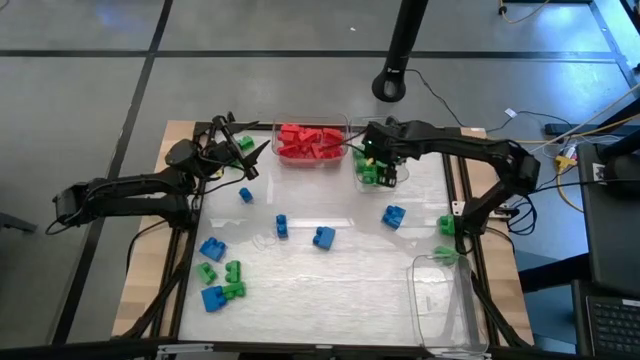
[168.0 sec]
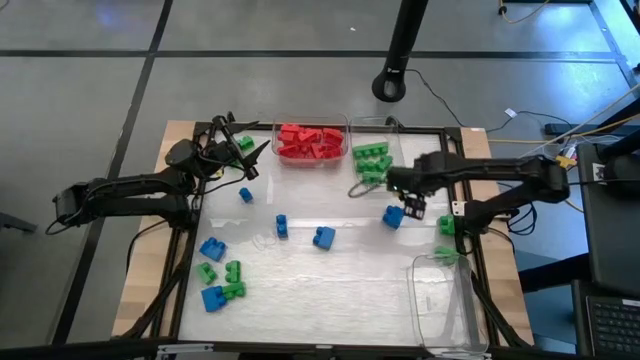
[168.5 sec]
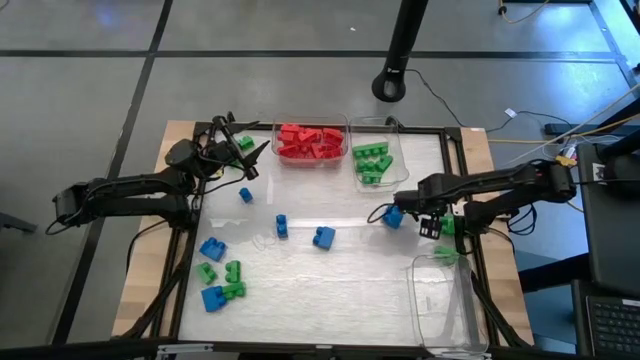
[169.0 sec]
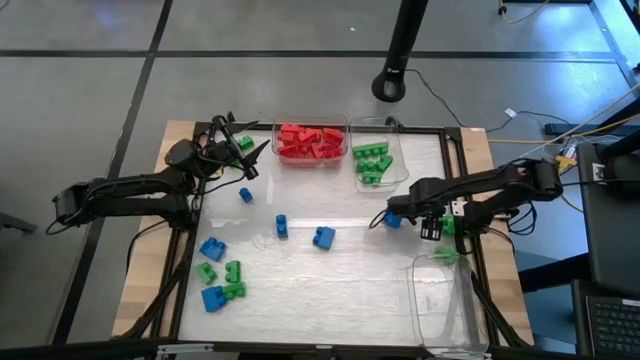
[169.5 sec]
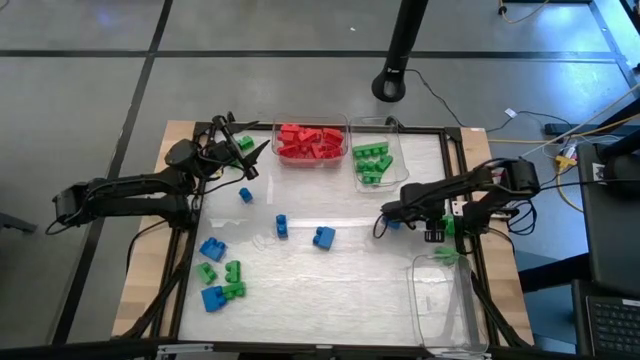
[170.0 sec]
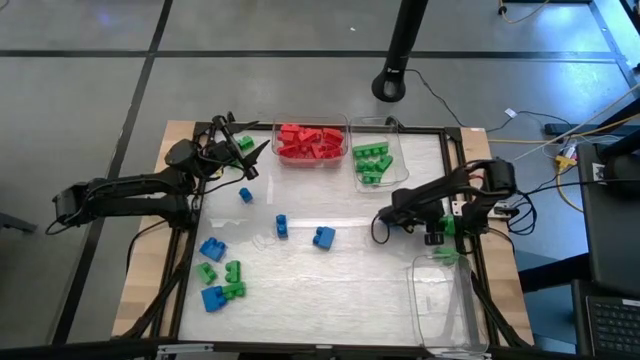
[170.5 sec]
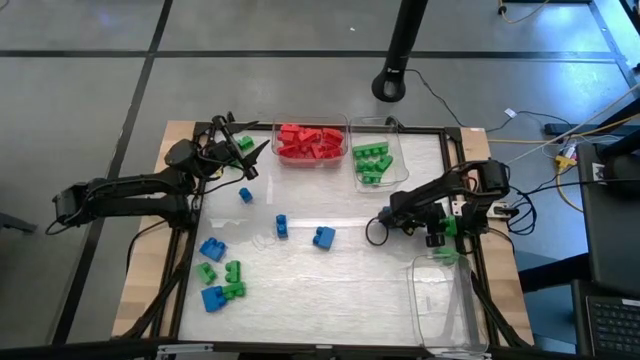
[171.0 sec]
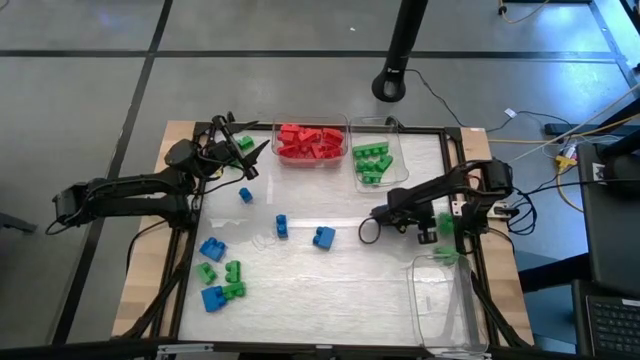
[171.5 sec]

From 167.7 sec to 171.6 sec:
Task: Sort blocks
Put the green game piece into the top right transparent bin

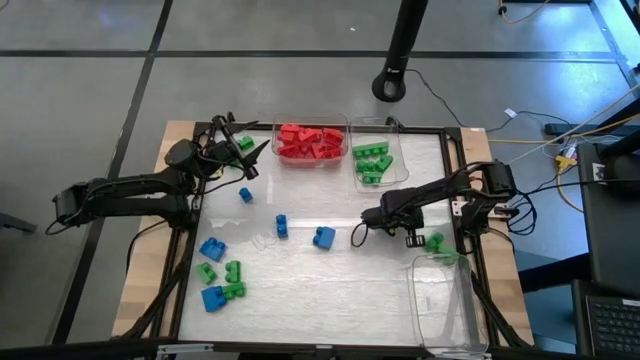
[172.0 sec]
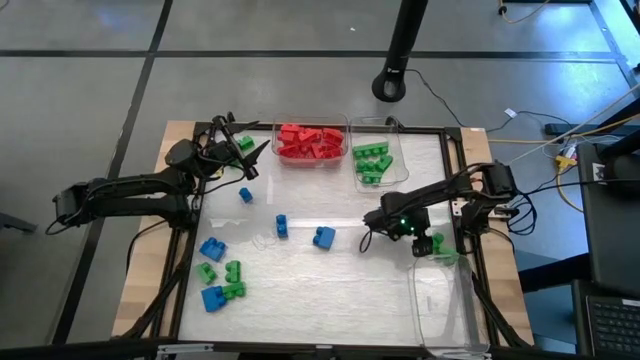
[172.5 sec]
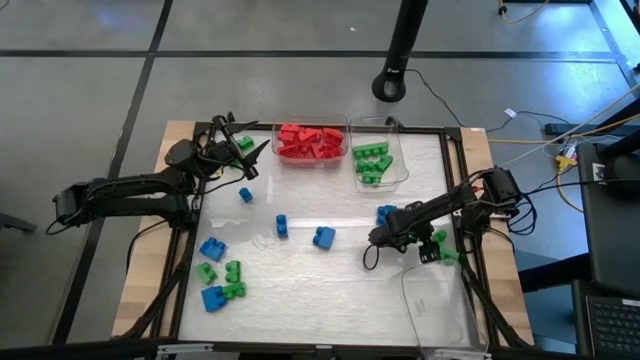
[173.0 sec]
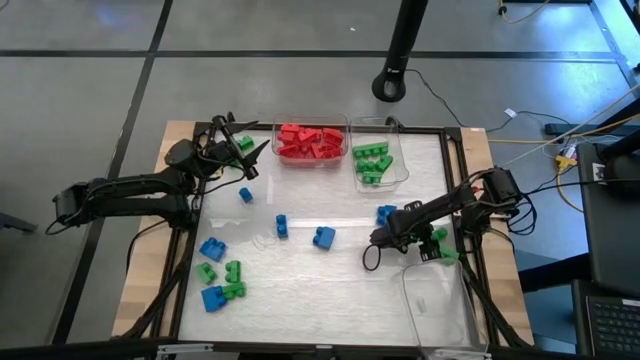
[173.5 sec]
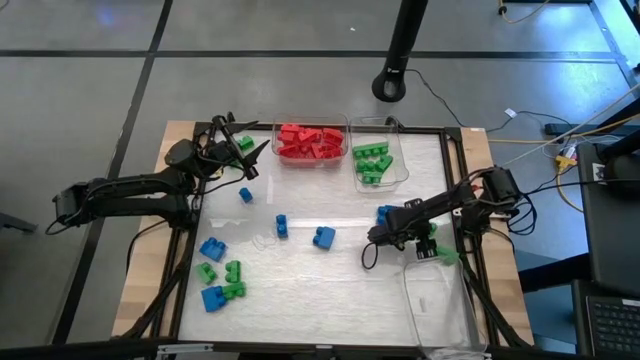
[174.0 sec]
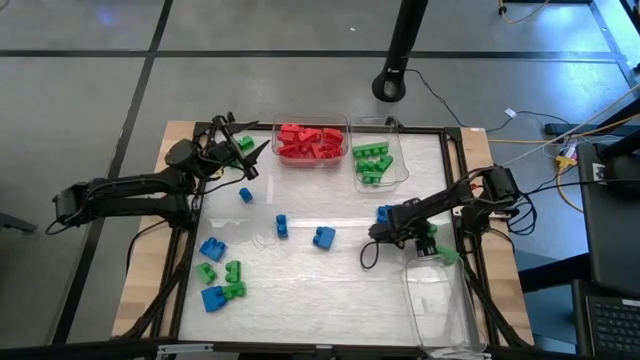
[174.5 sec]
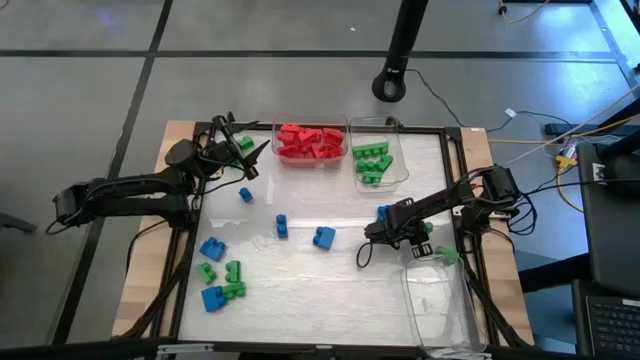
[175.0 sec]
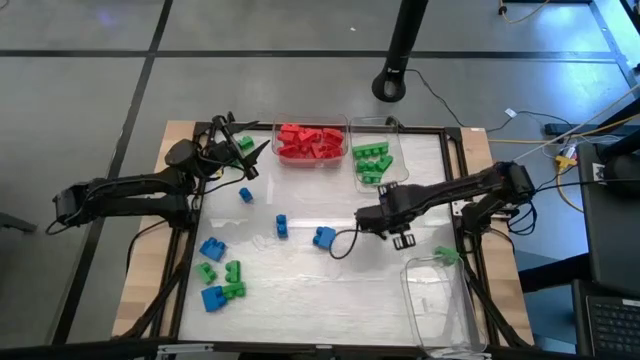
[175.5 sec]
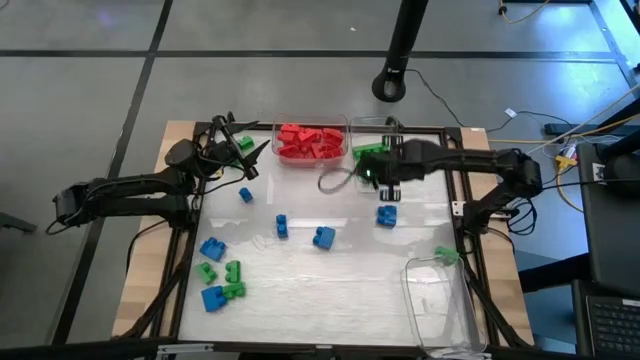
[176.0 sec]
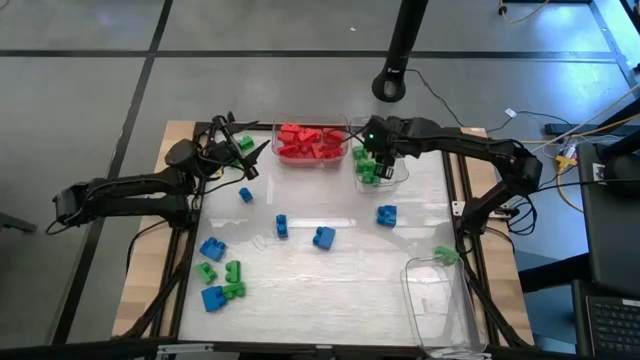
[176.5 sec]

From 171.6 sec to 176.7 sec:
Put the green game piece into the top right transparent bin

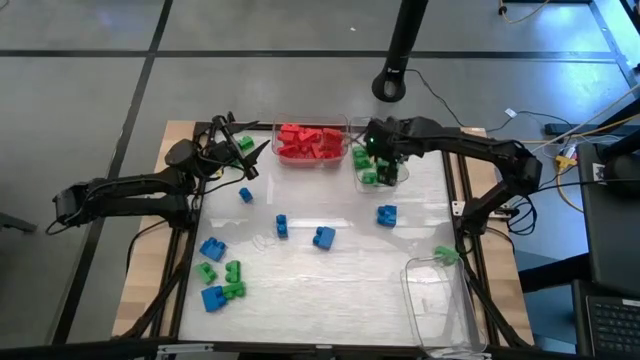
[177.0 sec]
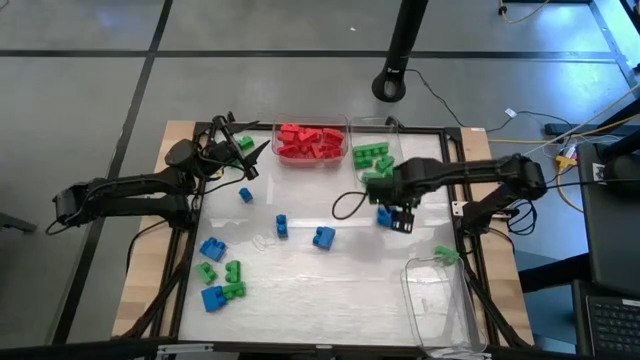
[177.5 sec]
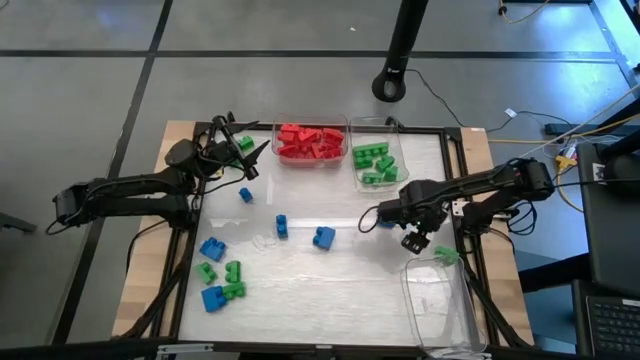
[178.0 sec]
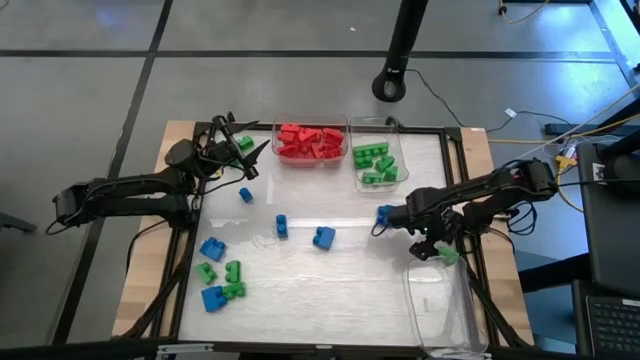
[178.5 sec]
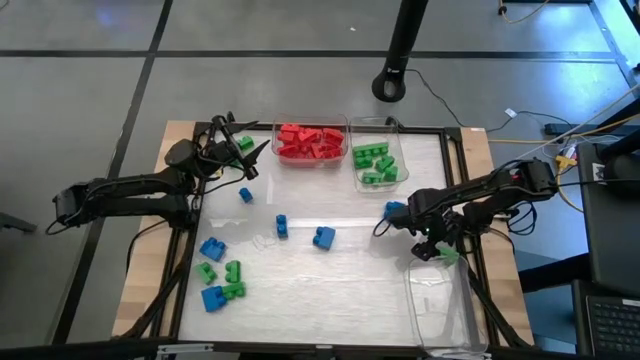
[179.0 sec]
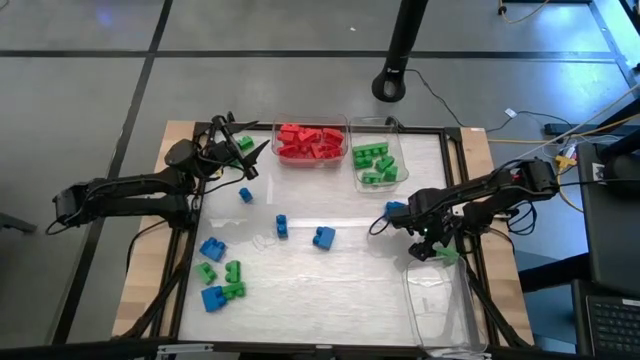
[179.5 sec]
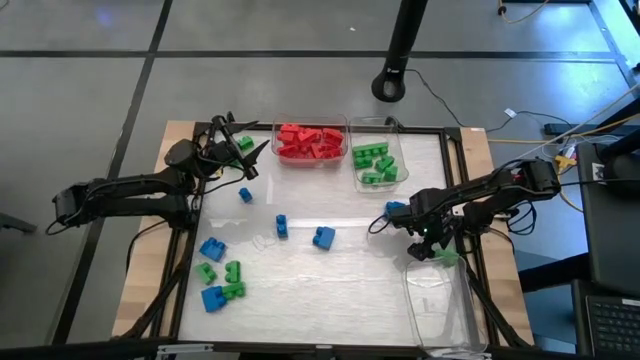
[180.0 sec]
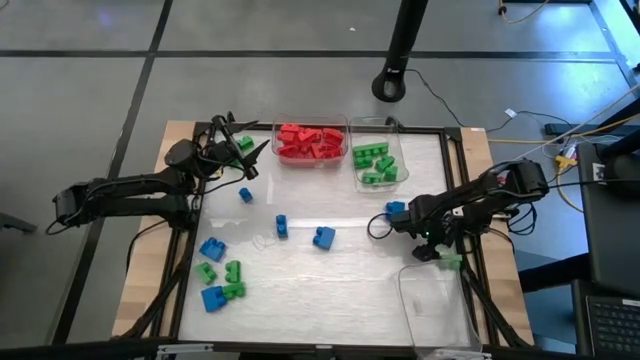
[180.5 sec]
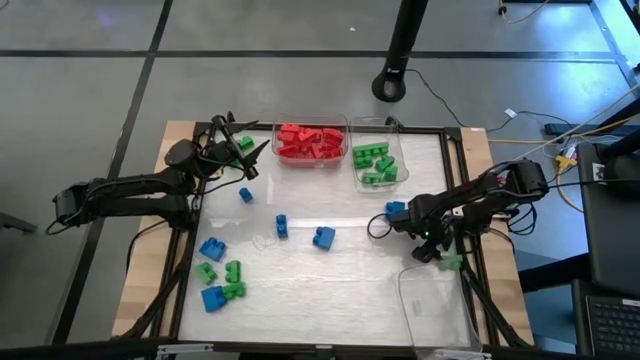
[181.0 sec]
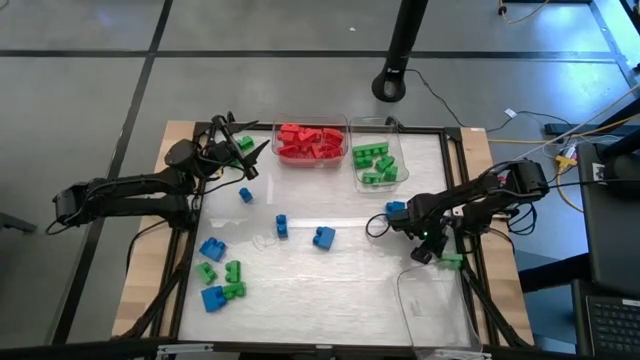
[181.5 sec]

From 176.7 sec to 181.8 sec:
Put the green game piece into the top right transparent bin

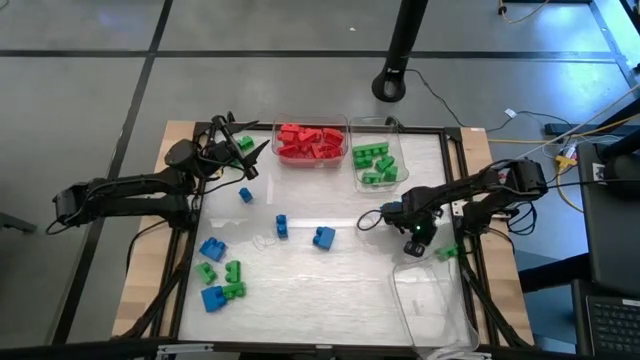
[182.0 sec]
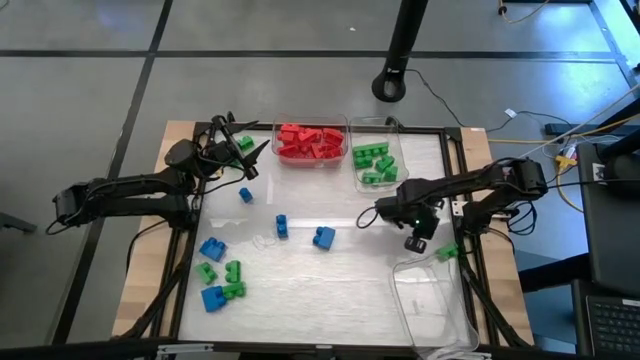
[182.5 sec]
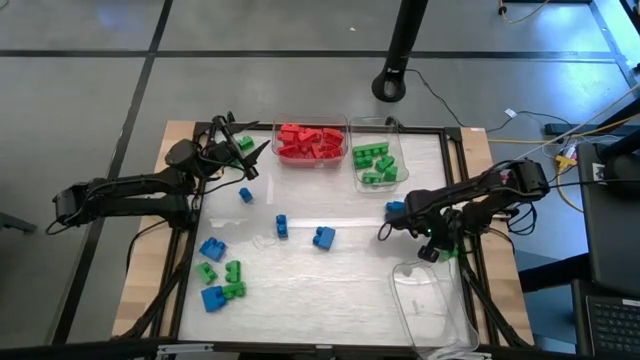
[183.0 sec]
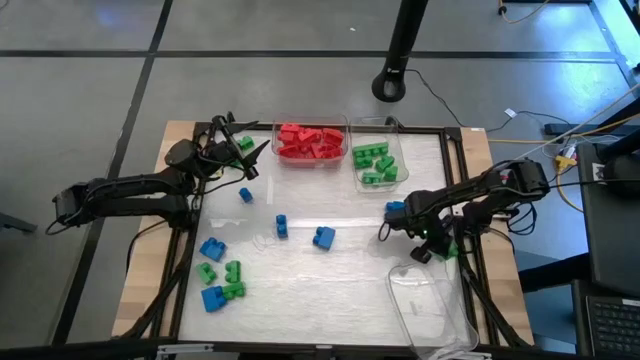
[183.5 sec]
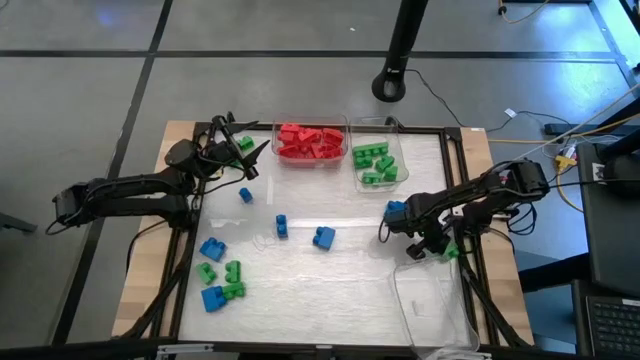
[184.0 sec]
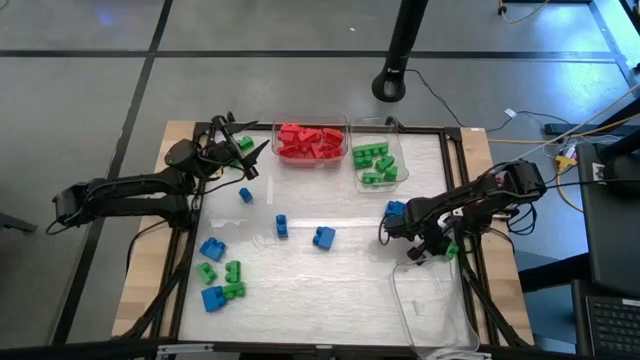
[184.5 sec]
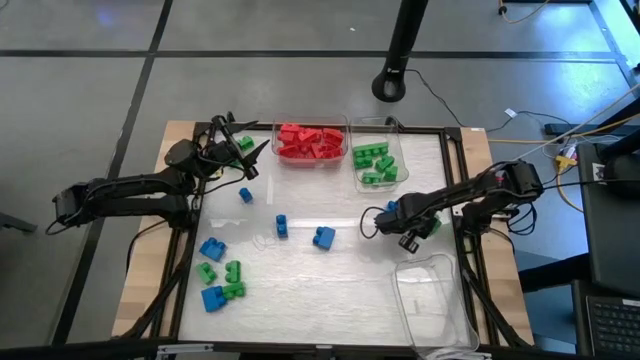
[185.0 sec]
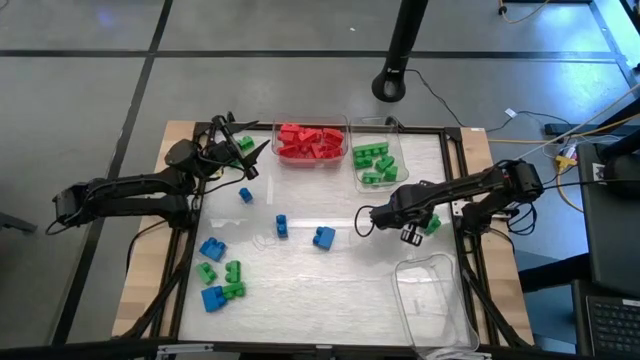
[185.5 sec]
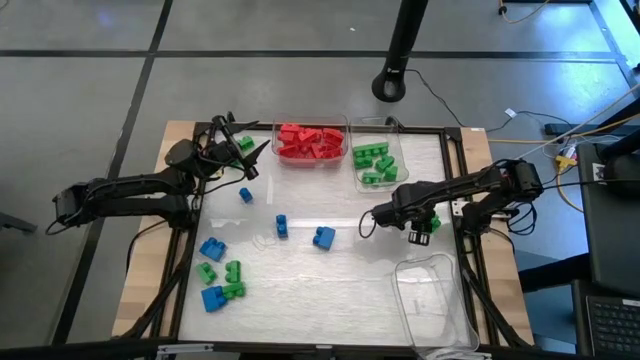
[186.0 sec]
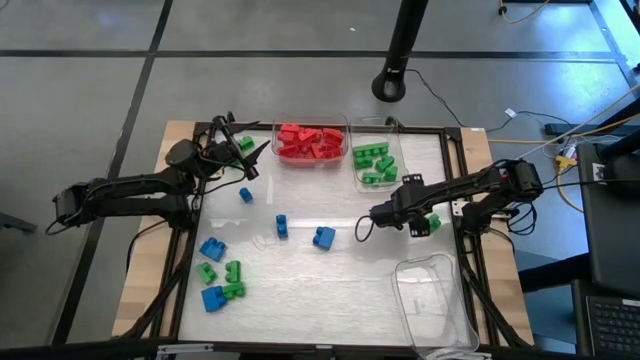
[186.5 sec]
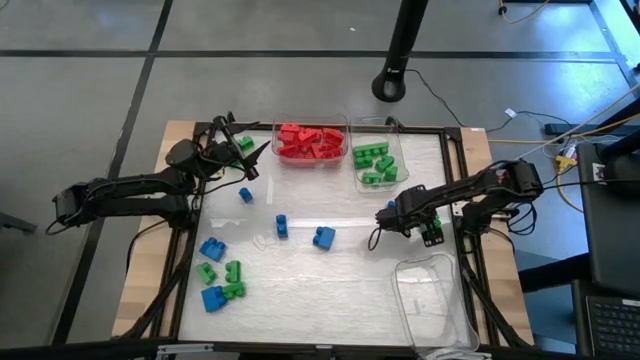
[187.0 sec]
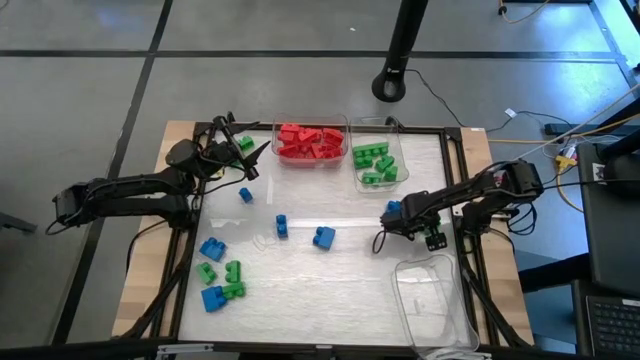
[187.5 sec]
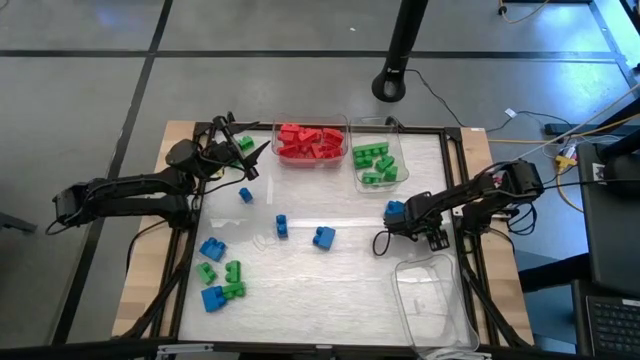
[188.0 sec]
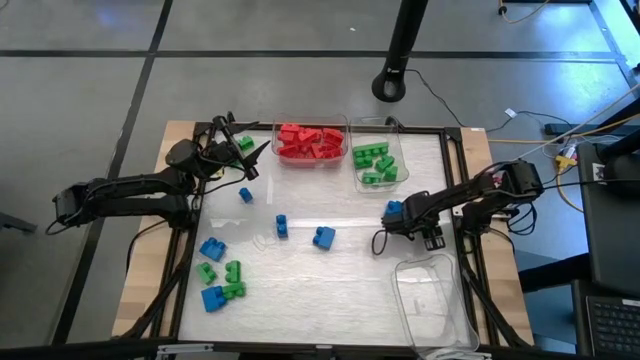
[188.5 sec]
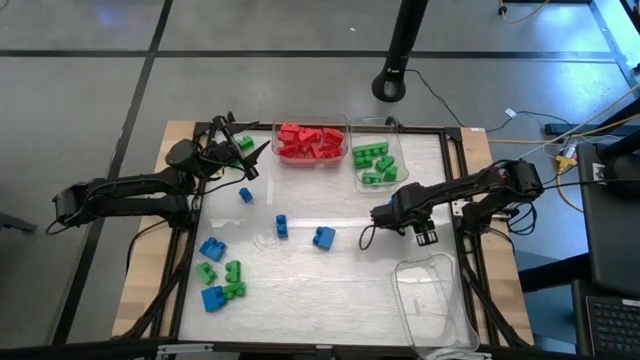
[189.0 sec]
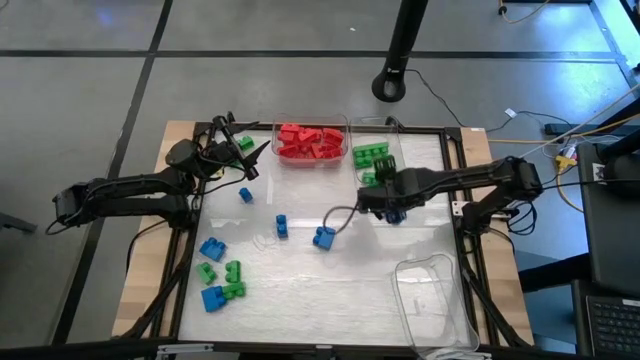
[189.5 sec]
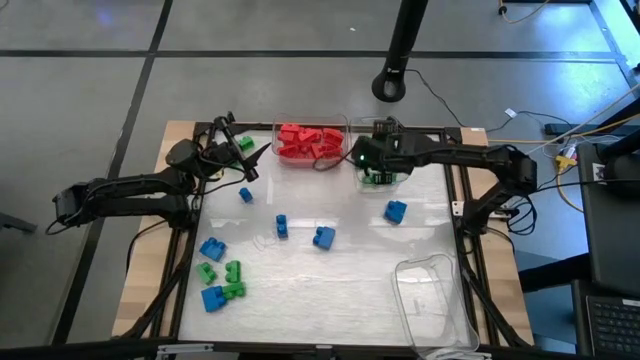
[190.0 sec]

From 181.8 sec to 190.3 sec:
Put the green game piece into the top right transparent bin
